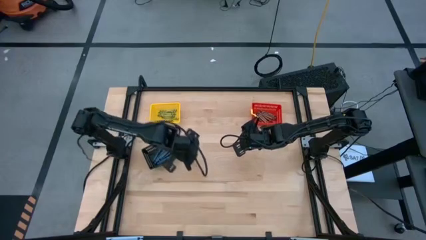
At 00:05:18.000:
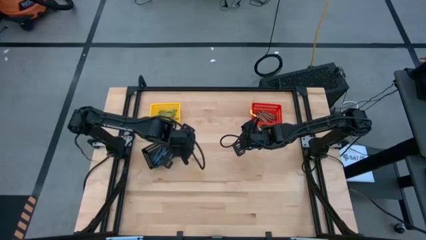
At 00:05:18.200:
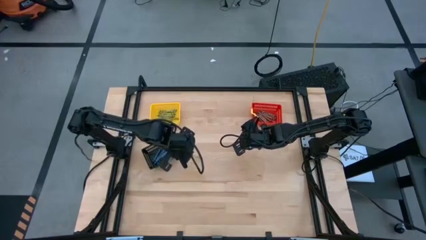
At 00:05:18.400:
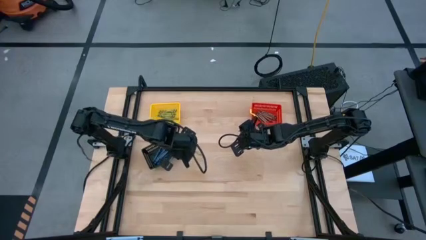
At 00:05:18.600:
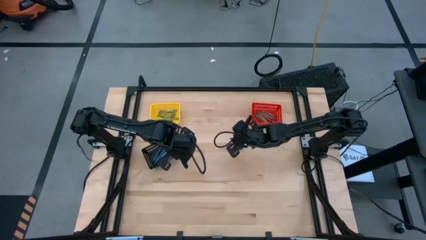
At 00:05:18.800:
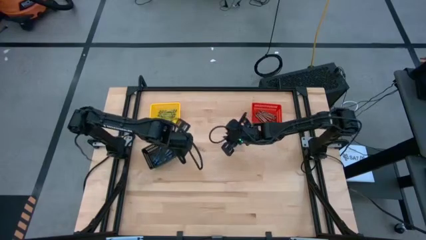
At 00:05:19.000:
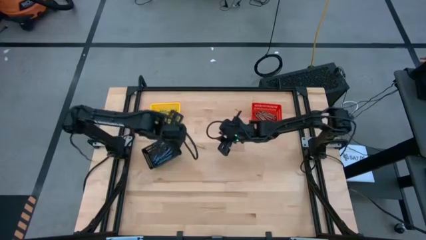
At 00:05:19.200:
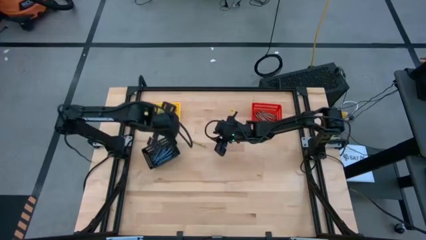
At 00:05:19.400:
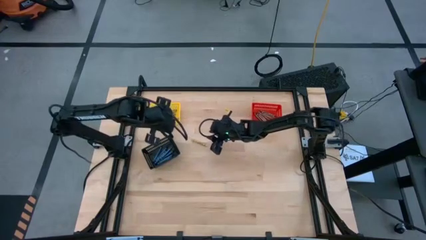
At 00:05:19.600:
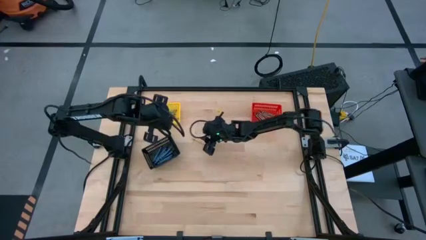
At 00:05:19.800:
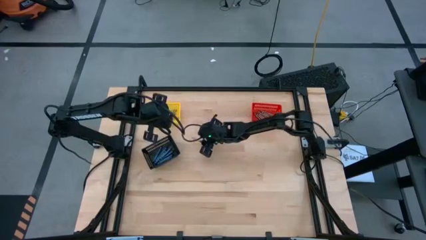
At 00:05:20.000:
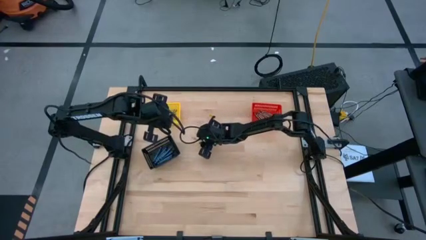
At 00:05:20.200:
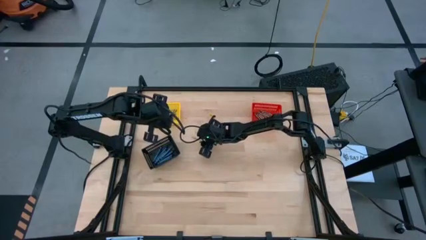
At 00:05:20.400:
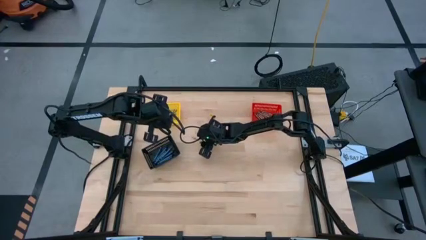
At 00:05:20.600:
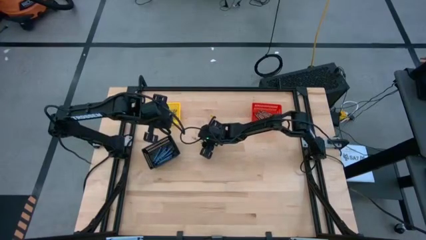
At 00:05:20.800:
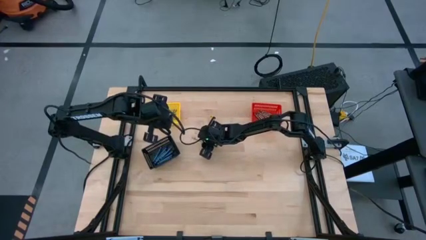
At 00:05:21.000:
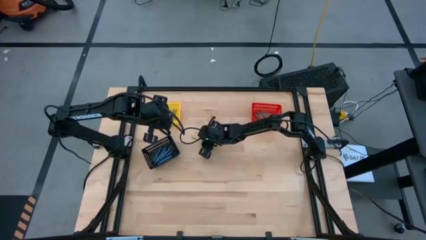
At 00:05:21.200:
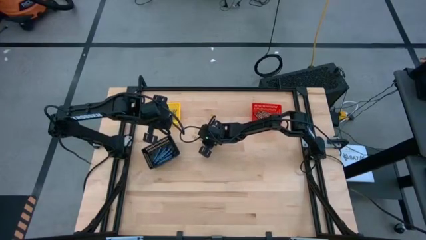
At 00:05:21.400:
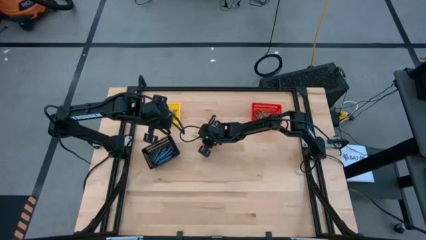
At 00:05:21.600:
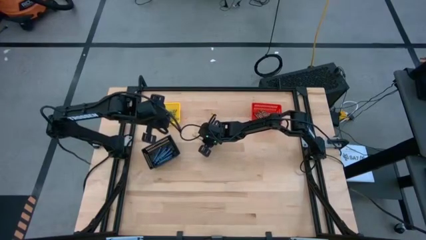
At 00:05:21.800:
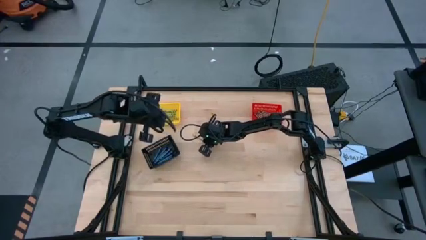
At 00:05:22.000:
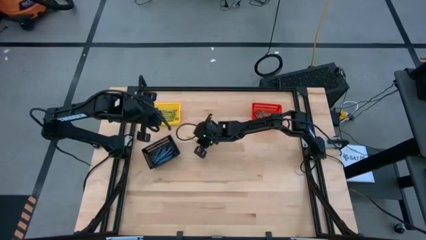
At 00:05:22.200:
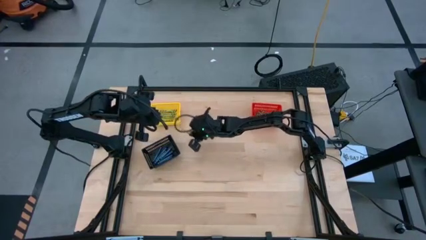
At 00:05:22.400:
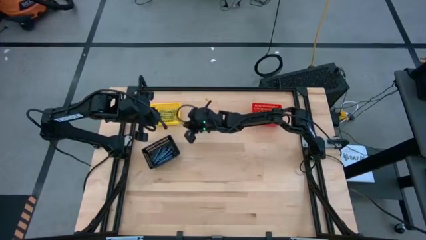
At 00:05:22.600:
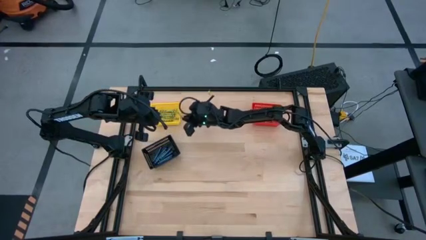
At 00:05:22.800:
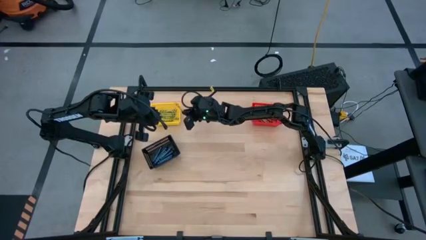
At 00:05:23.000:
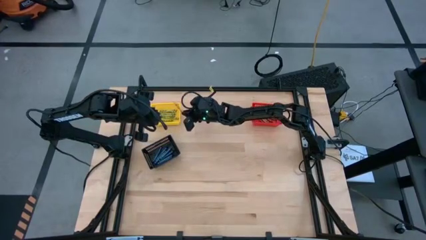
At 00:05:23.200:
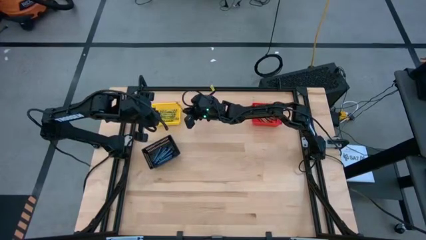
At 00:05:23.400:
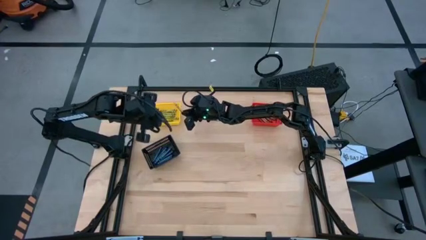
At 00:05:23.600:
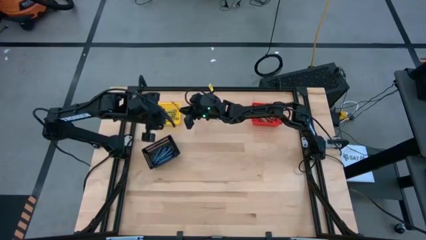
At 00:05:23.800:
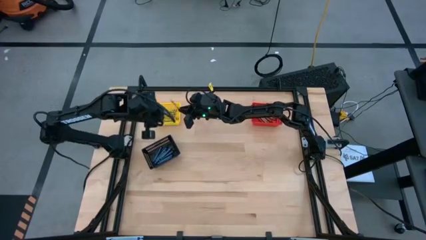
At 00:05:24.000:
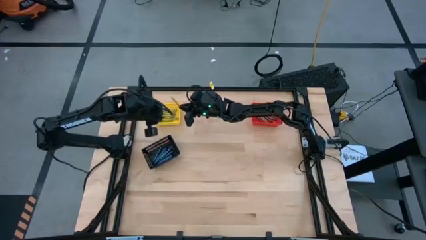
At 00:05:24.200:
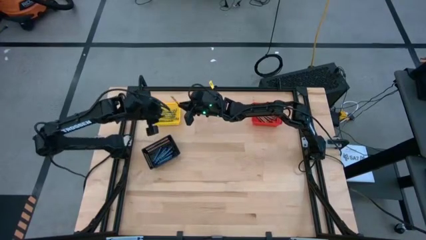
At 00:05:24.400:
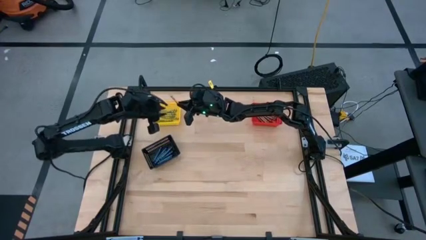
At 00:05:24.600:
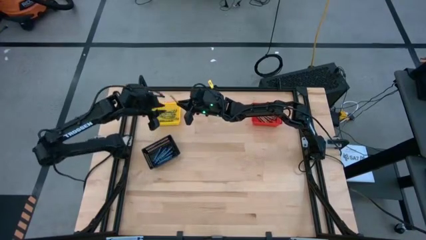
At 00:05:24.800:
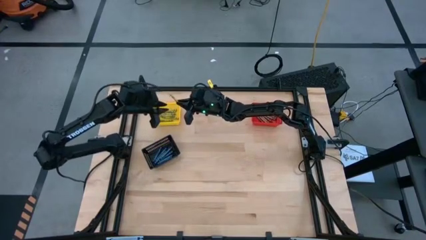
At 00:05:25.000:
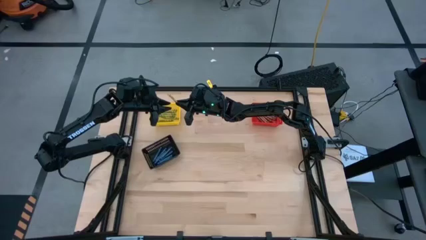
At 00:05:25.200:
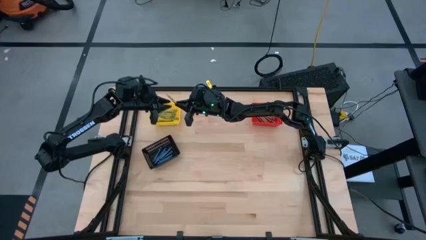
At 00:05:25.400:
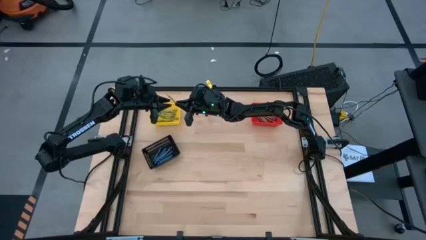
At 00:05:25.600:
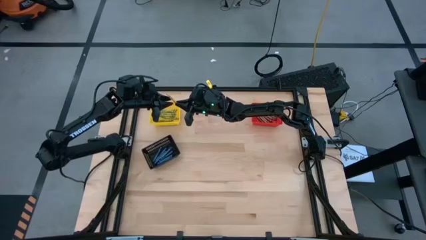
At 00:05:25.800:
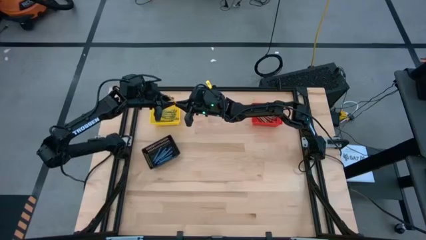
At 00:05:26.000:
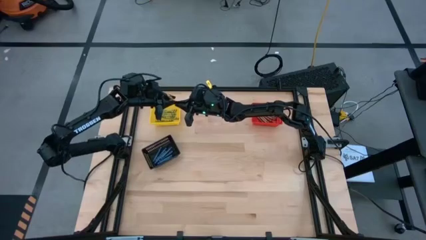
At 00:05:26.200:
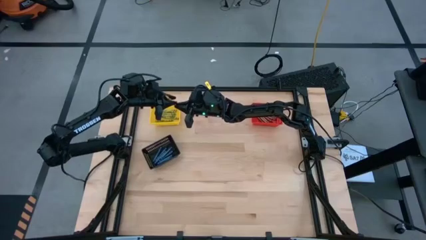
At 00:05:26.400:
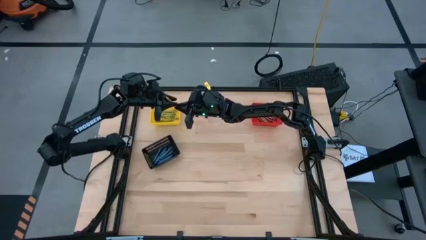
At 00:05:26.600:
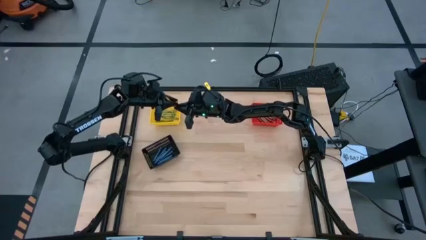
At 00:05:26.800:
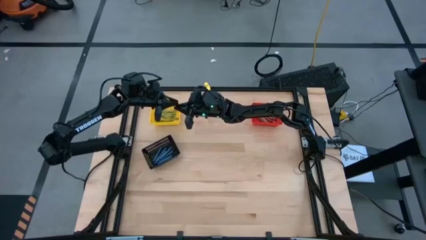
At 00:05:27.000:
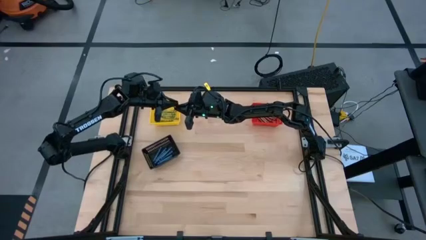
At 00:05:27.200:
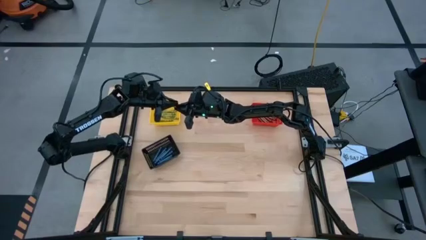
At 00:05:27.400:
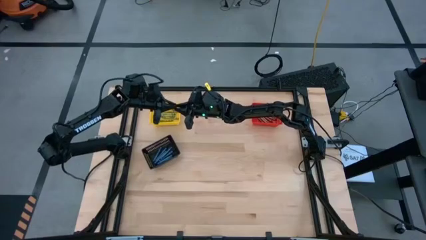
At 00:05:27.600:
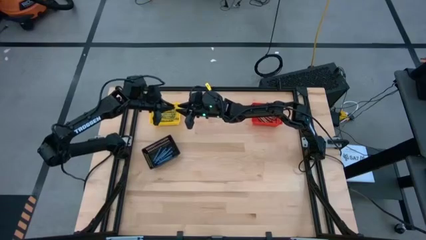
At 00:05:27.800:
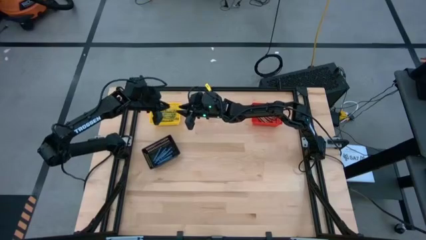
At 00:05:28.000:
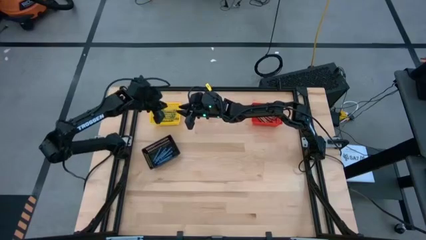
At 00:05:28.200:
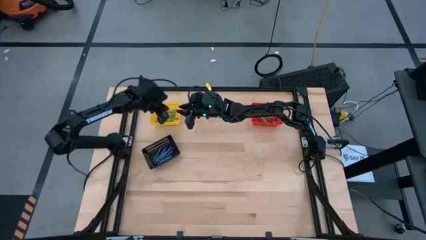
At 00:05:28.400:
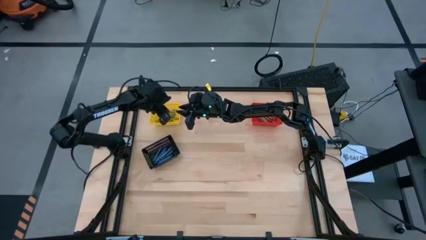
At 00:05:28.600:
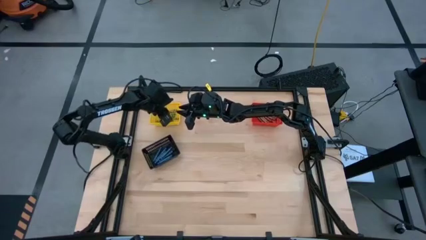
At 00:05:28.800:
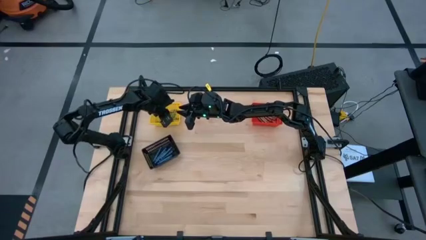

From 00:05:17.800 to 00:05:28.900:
Task: Sort crayons
Put the light green crayon into the yellow bin
